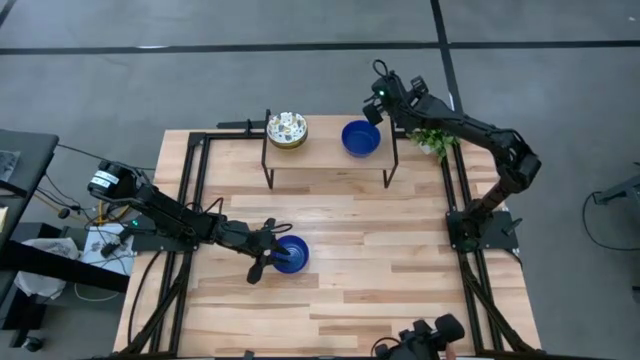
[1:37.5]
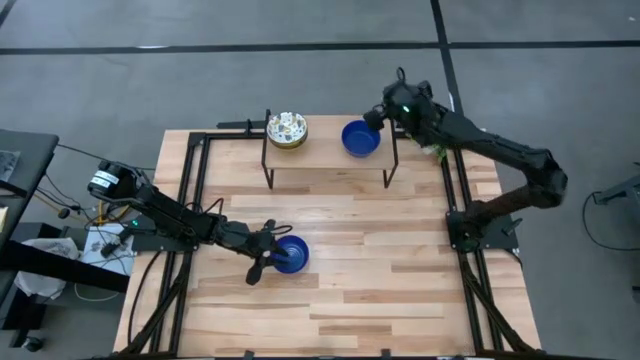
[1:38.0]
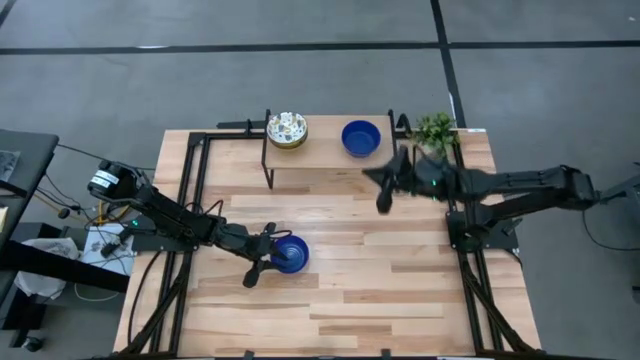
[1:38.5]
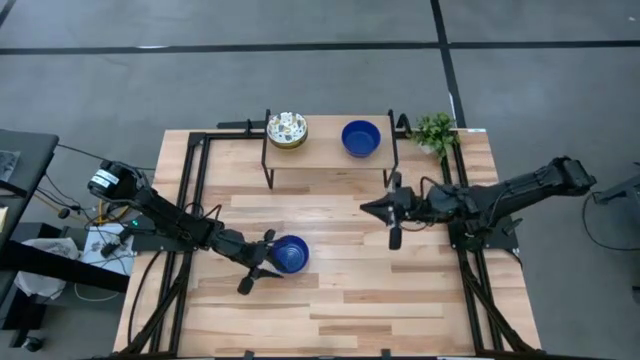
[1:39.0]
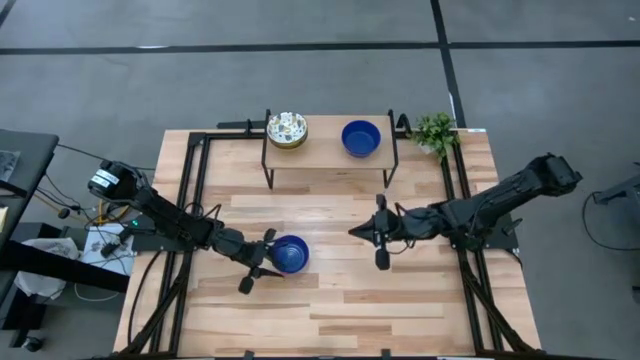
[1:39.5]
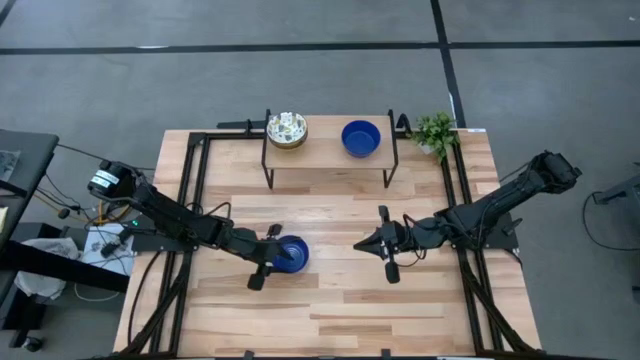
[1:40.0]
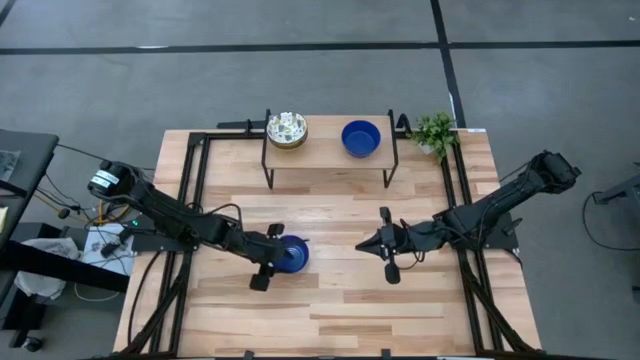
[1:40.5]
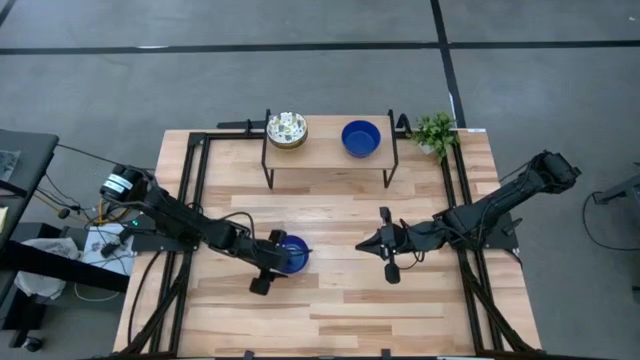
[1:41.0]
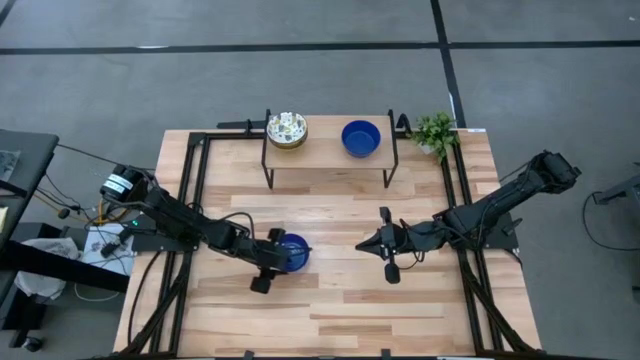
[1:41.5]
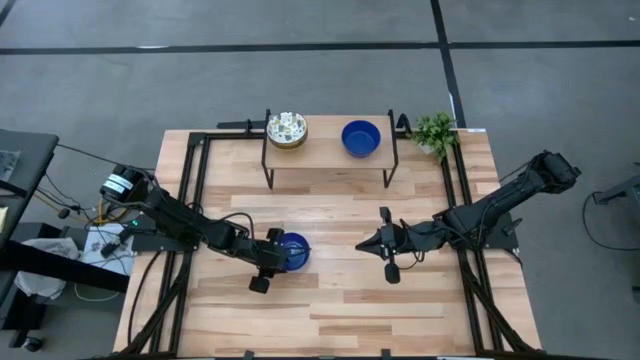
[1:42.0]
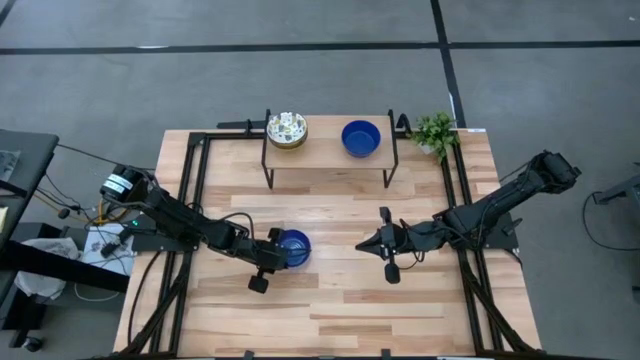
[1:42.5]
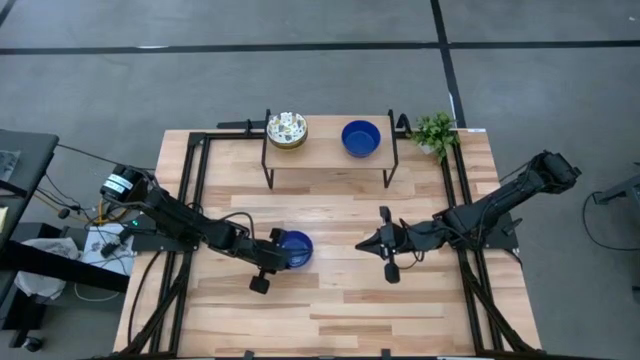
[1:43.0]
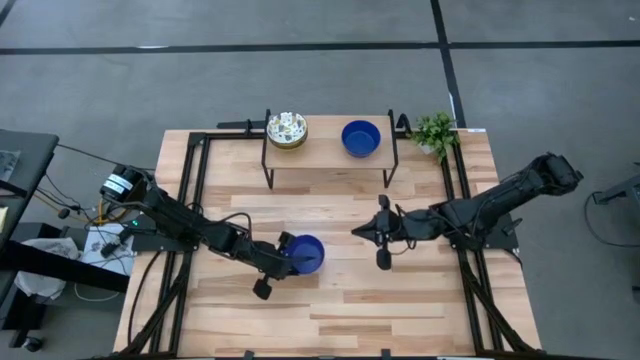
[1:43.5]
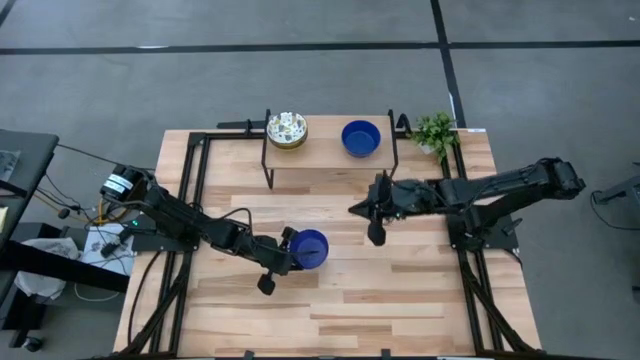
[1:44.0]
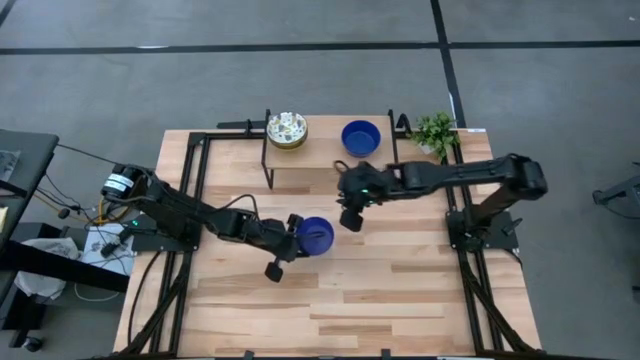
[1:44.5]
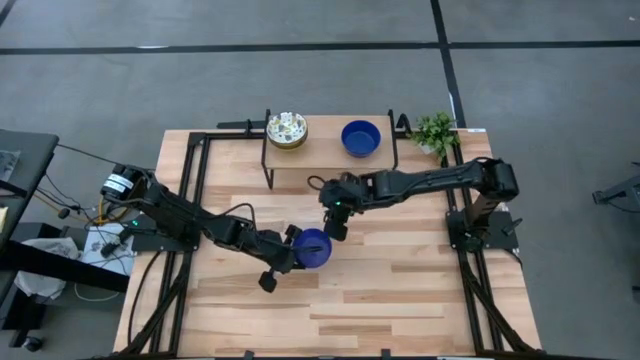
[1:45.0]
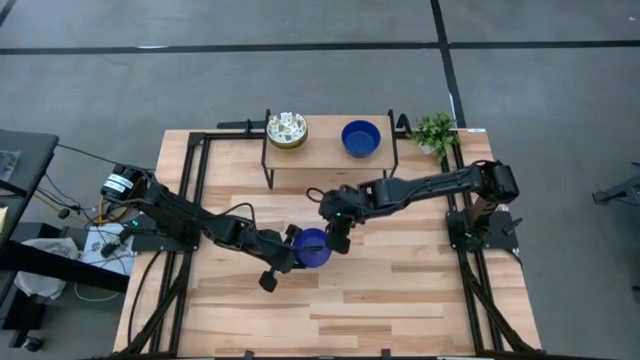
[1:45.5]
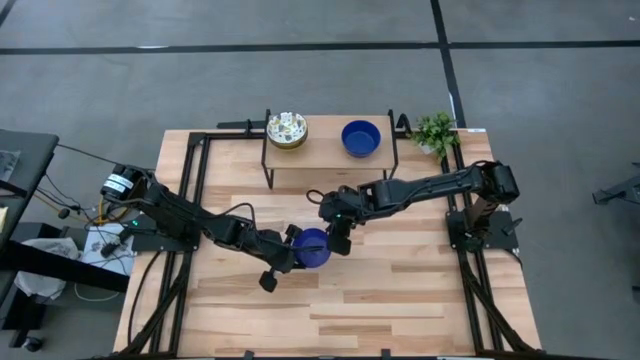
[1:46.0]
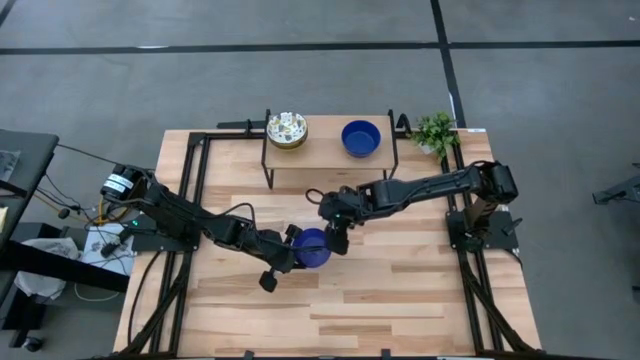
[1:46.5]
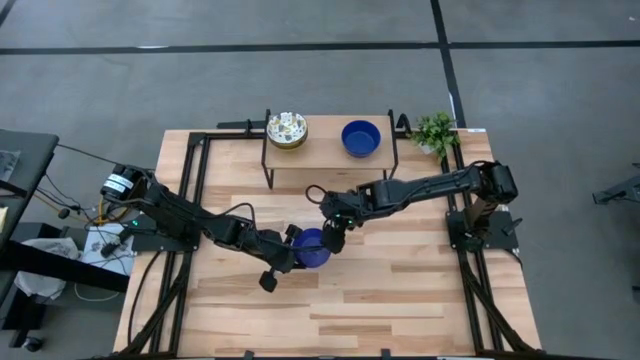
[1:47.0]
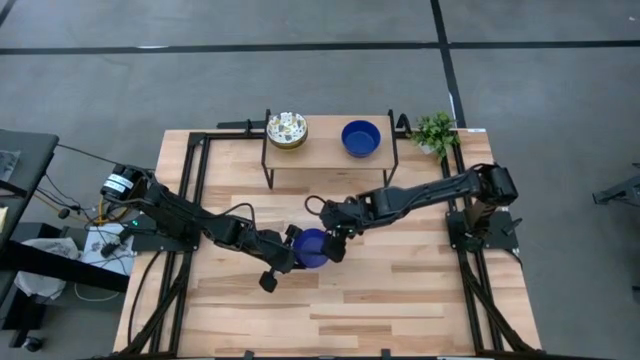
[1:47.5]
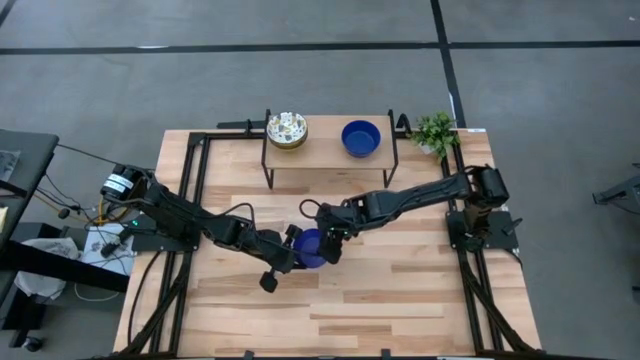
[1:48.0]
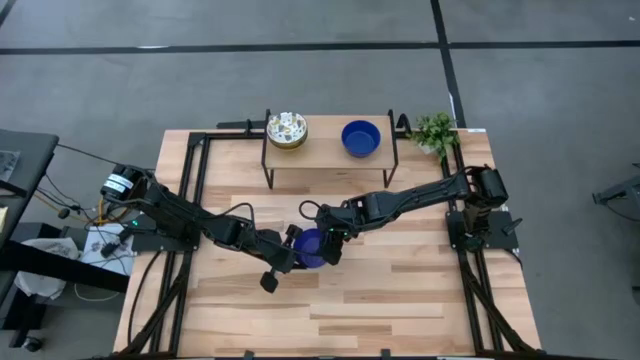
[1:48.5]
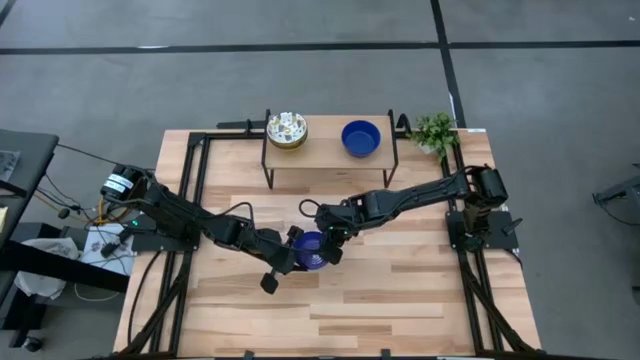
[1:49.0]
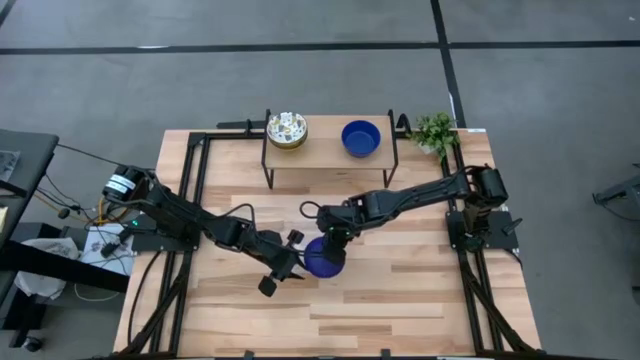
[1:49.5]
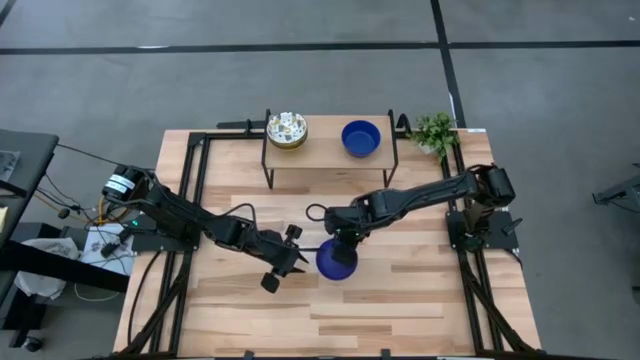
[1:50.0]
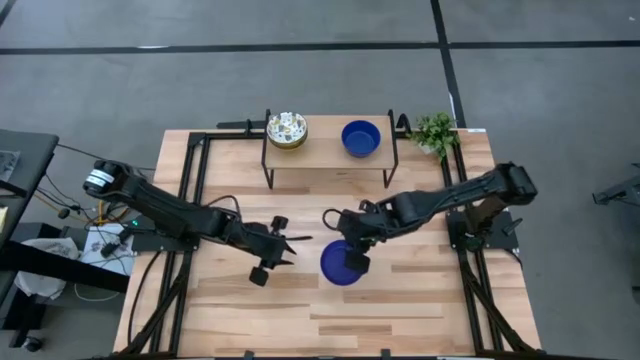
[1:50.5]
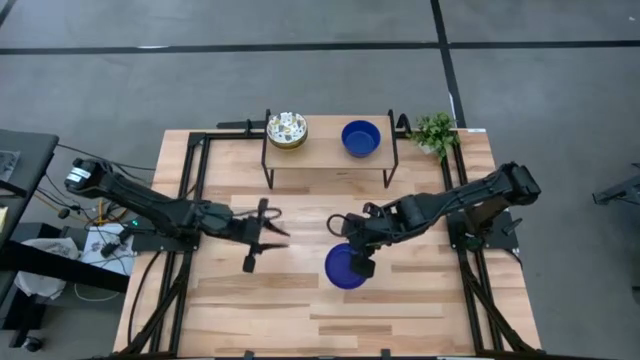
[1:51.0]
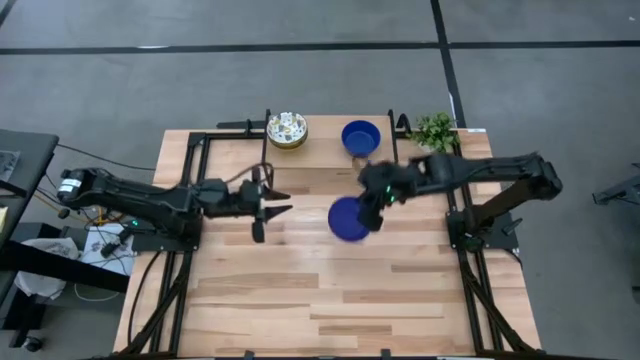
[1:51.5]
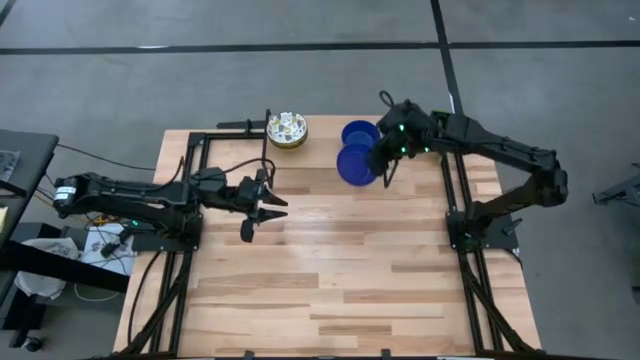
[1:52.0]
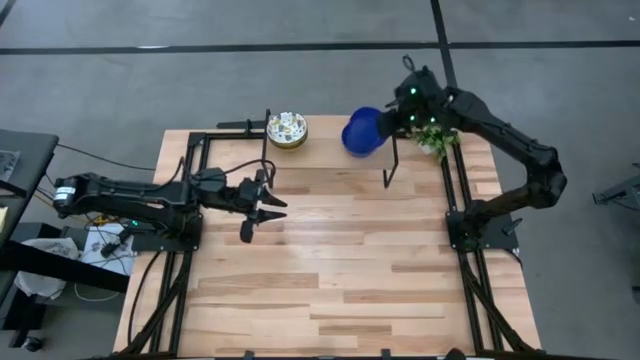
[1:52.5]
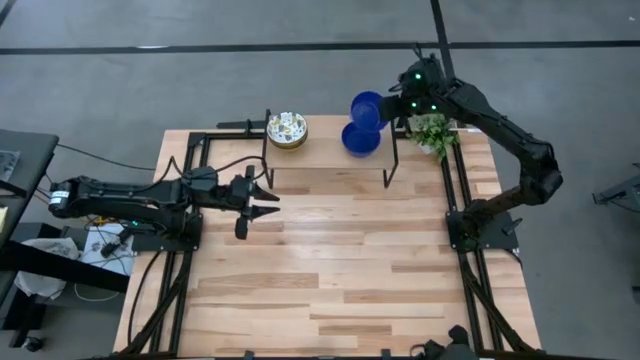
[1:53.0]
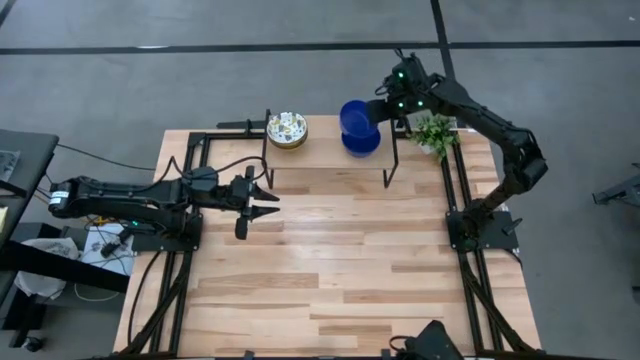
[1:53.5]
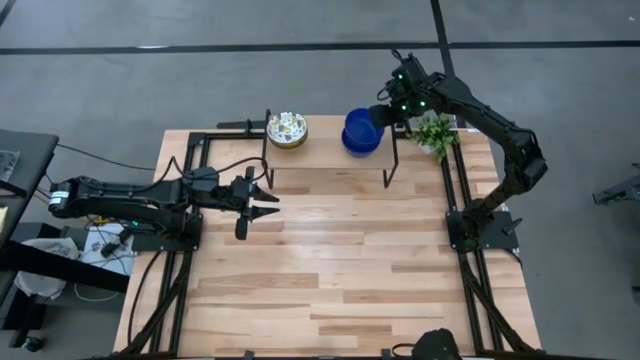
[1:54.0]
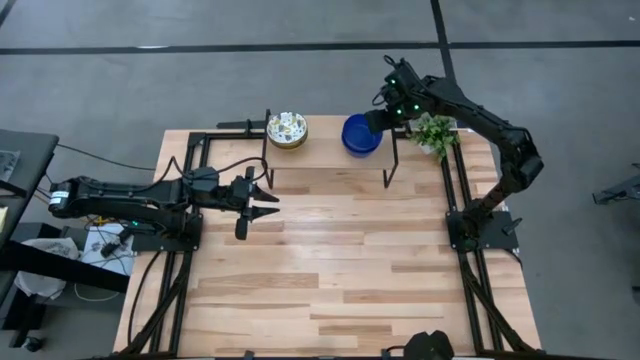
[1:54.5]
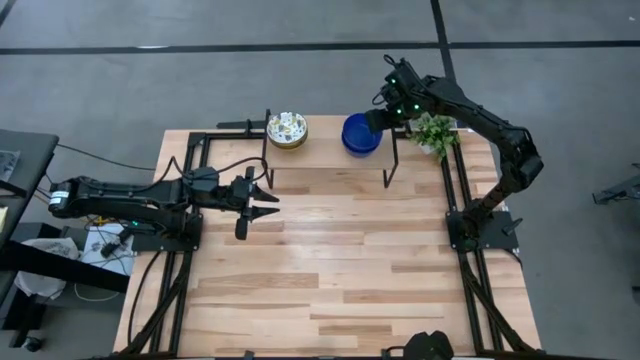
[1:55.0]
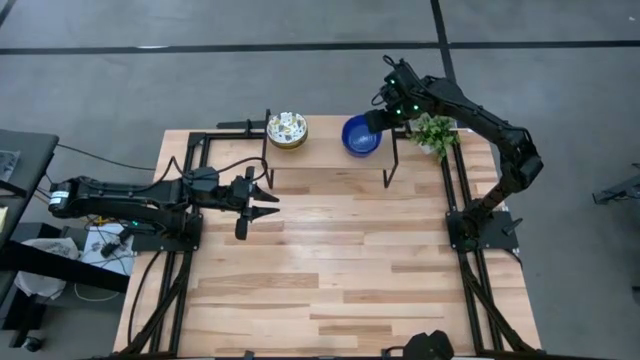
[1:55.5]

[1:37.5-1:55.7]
Task: Pick & Place Mini bowls
Stack the blue bowl on the top of the blue bowls on the shelf

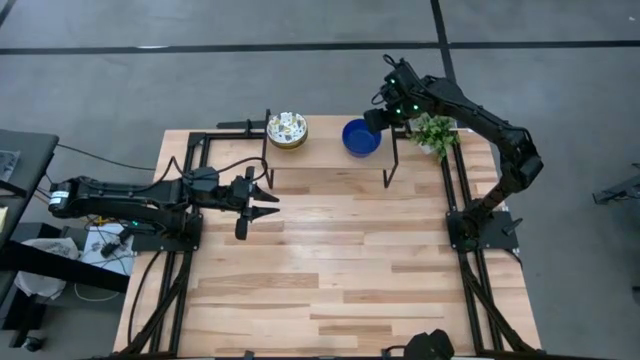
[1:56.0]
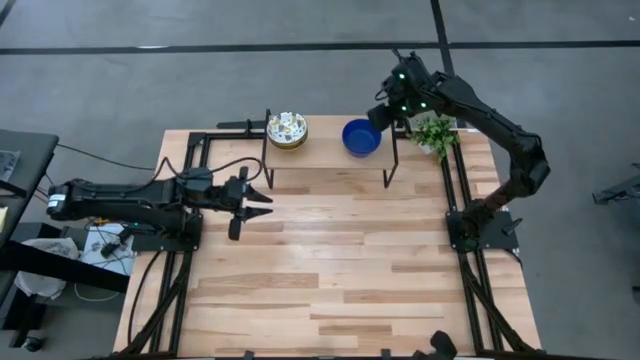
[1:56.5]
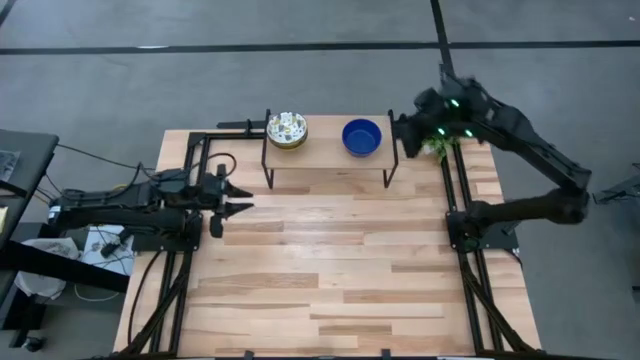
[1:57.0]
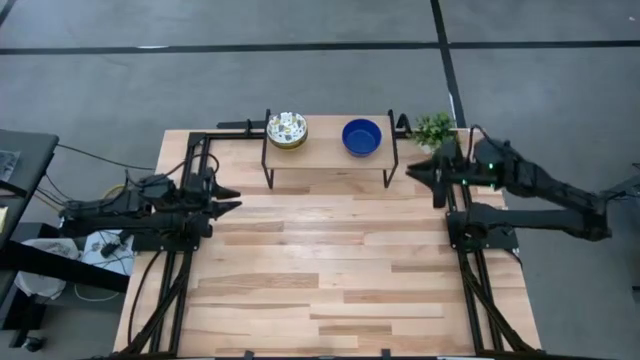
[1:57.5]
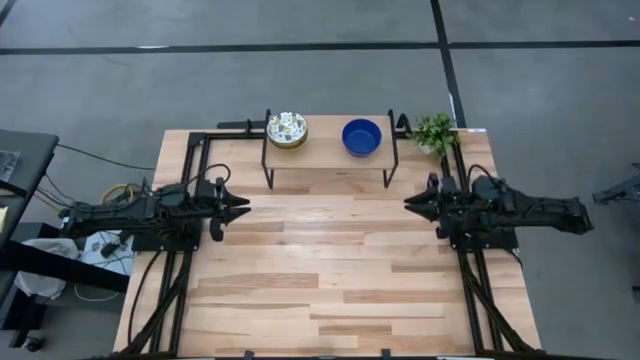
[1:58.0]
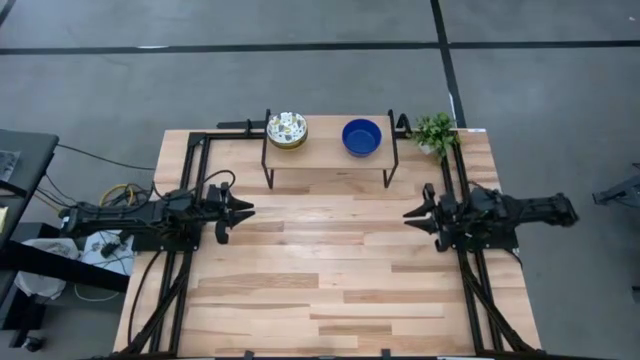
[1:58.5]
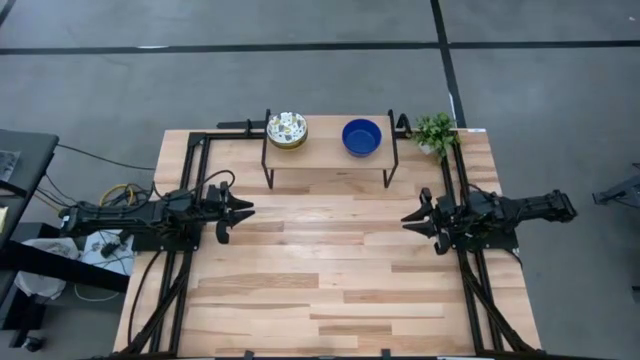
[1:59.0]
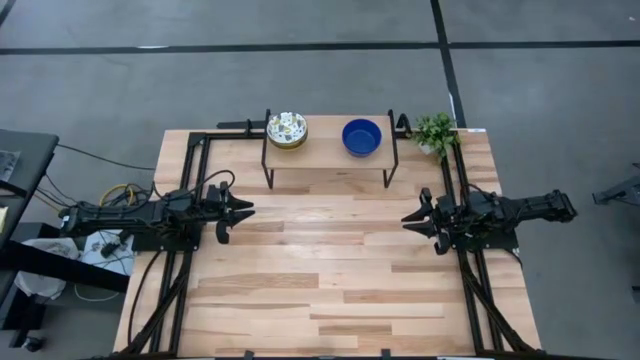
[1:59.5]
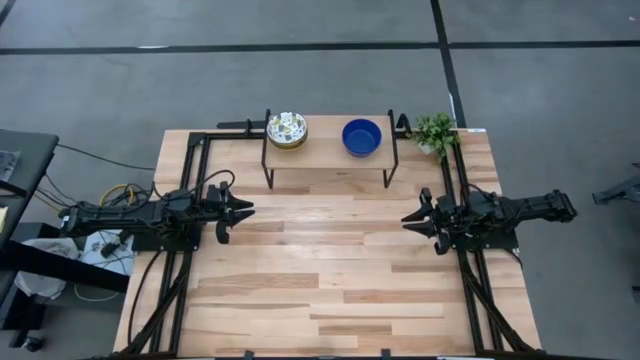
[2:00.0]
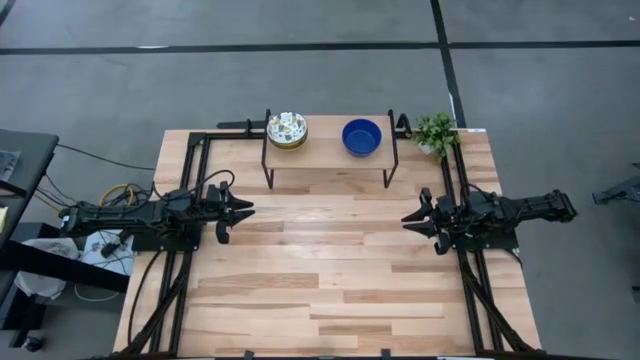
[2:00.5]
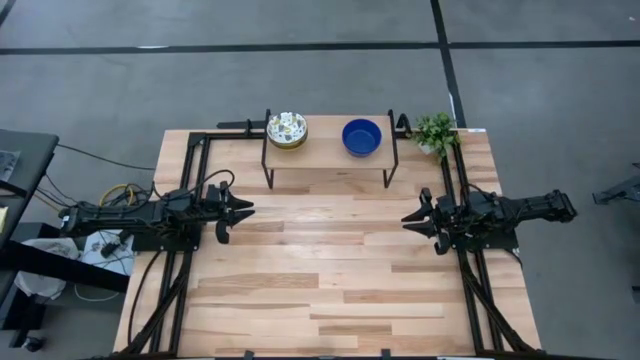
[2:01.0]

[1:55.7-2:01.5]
Return to Home Position
